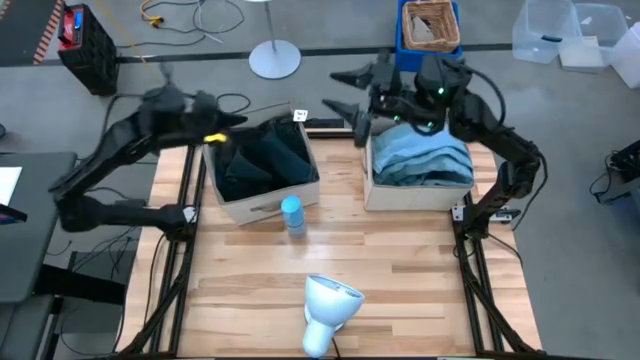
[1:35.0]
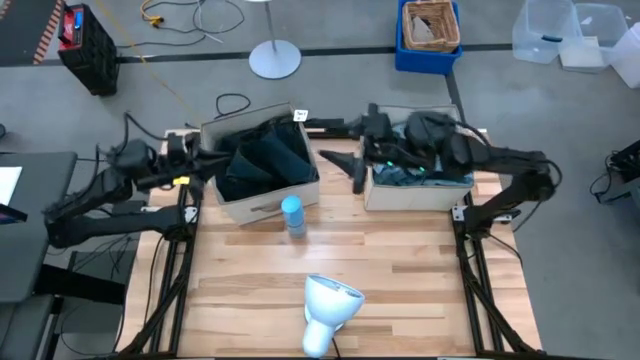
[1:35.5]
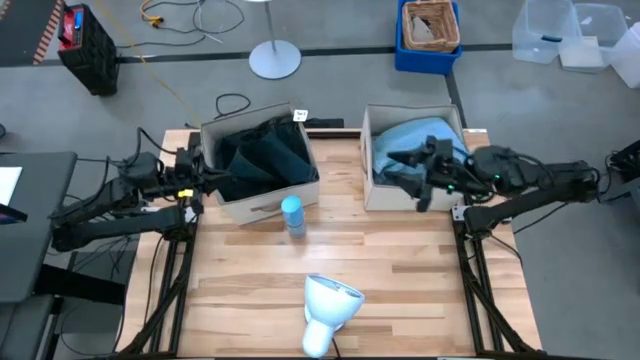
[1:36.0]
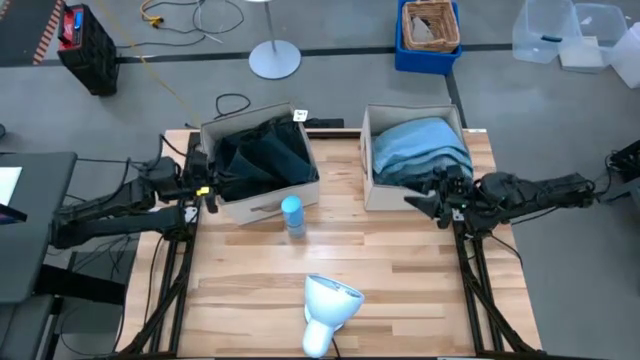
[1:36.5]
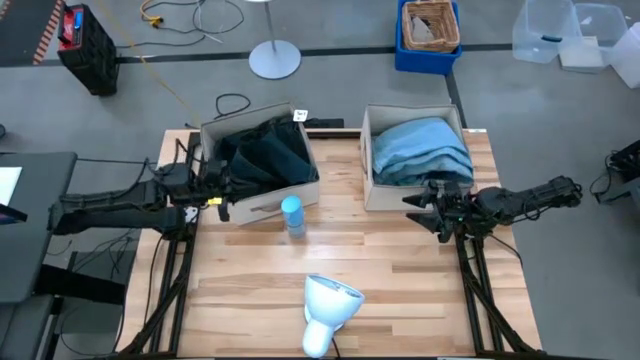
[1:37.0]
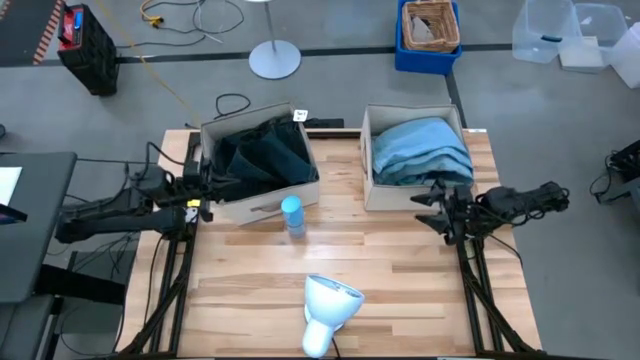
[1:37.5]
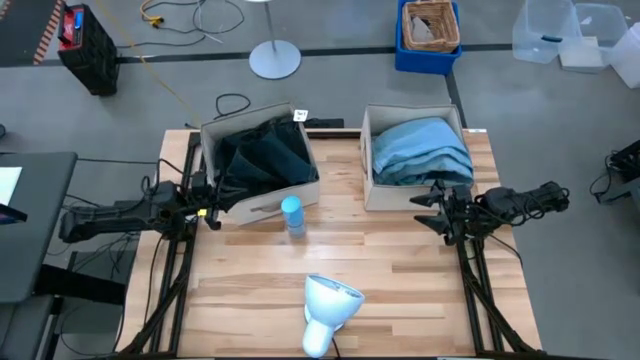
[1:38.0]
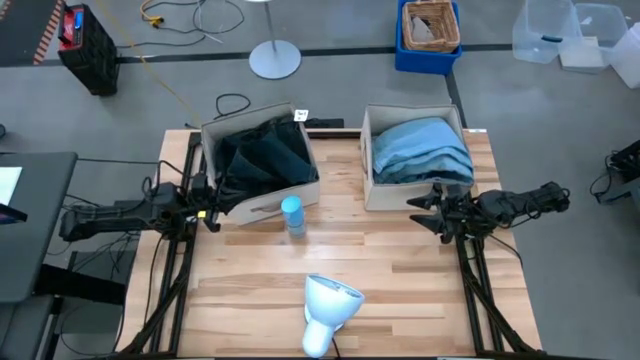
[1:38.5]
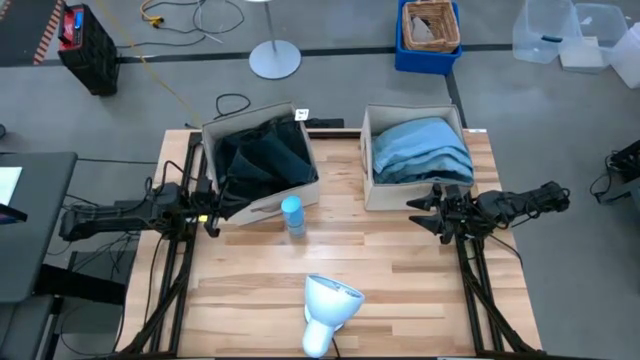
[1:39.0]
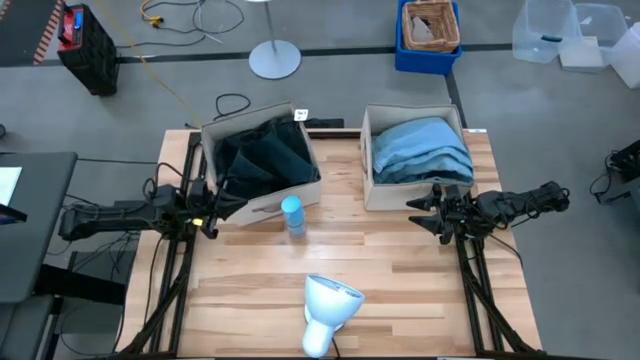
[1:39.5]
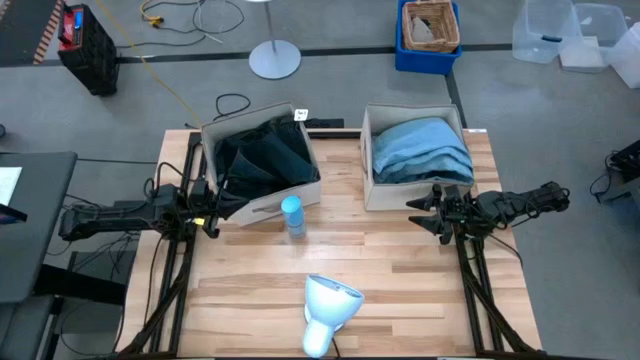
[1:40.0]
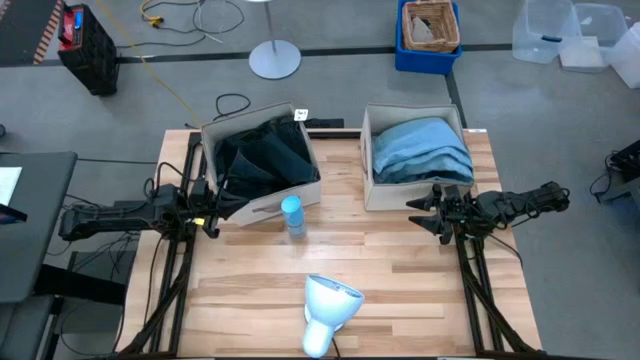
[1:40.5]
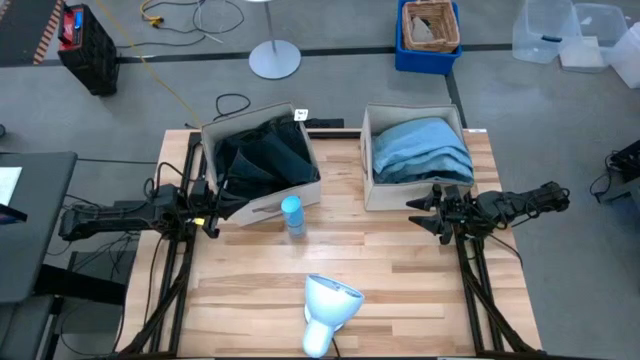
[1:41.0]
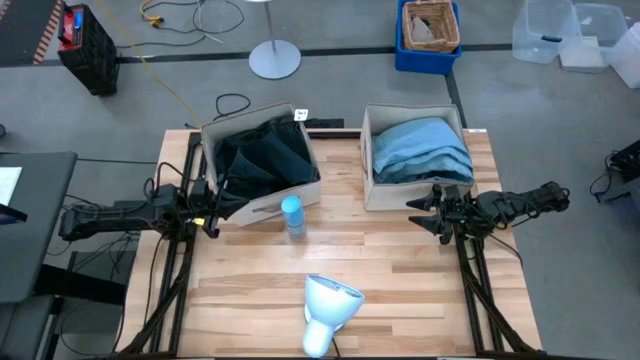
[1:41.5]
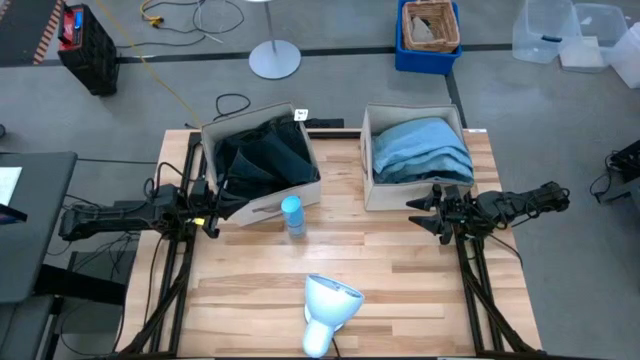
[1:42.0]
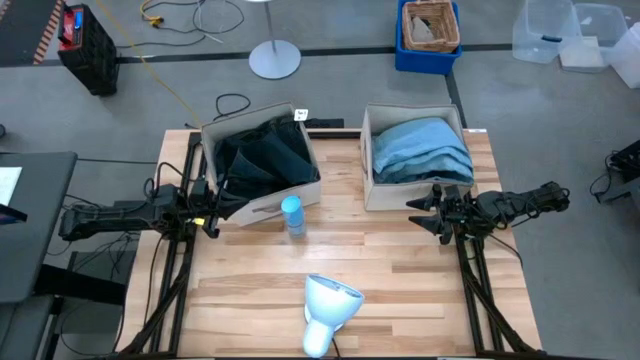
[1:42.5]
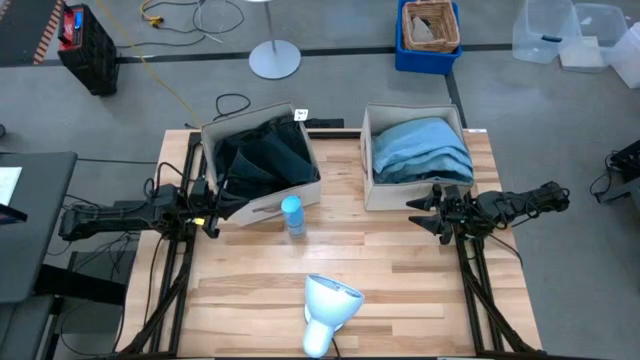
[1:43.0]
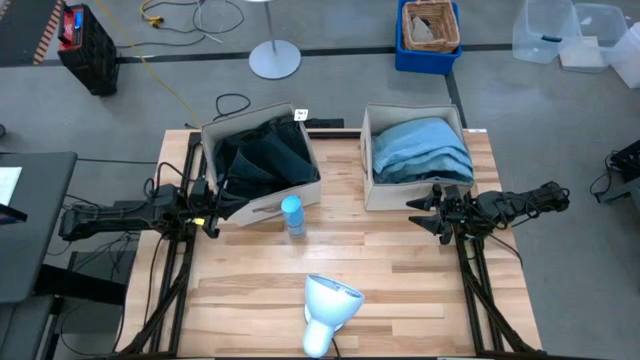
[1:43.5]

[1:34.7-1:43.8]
Task: Sort clothes
Return to Home Position

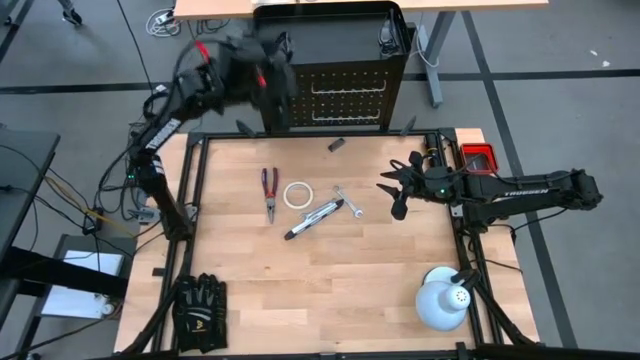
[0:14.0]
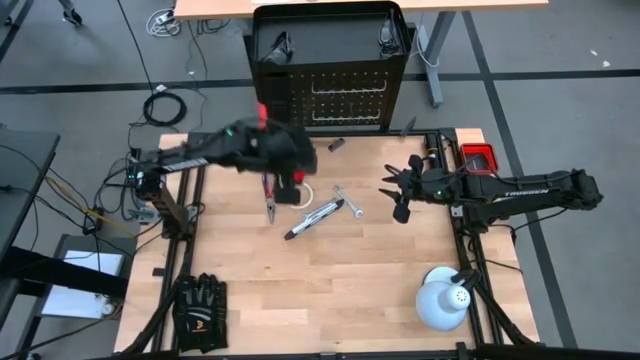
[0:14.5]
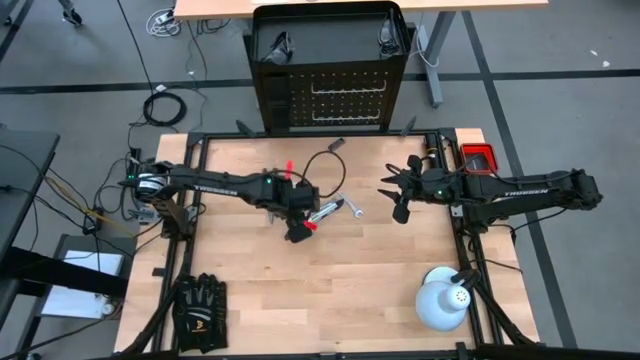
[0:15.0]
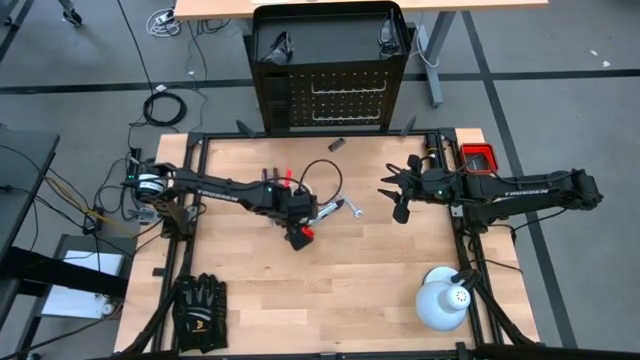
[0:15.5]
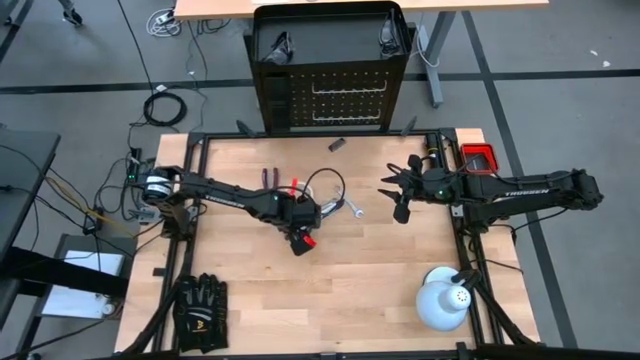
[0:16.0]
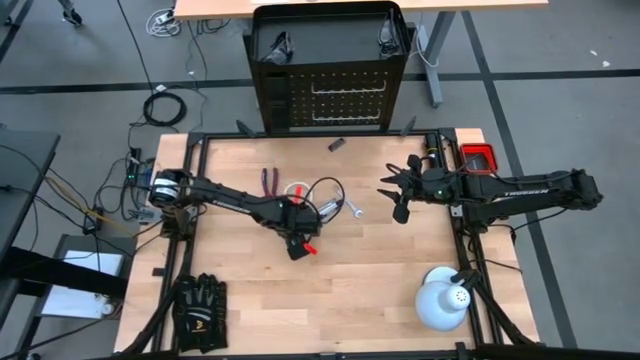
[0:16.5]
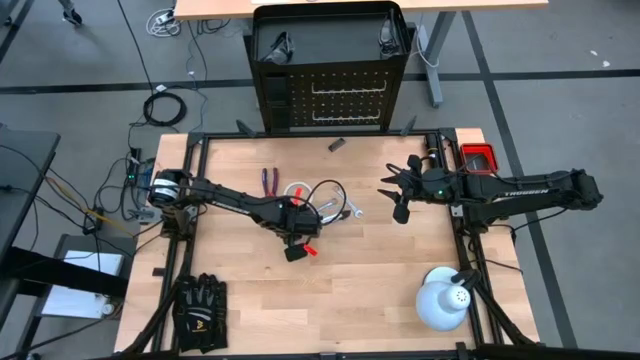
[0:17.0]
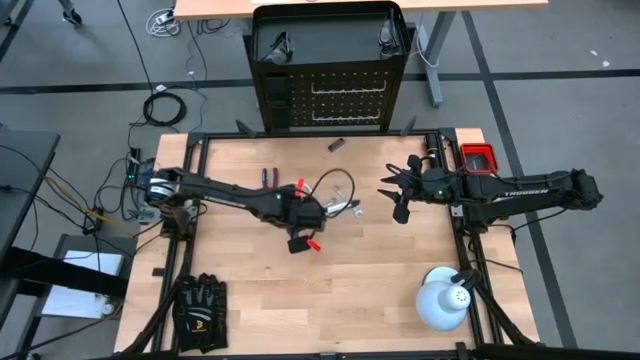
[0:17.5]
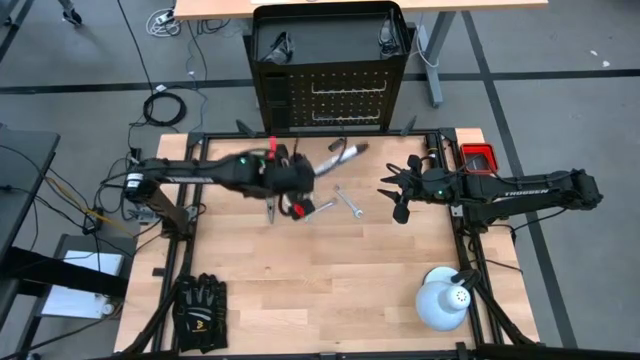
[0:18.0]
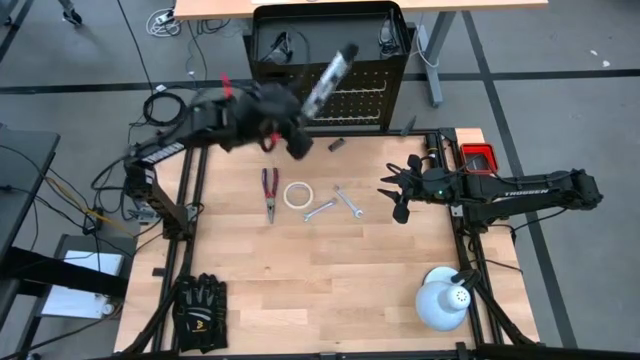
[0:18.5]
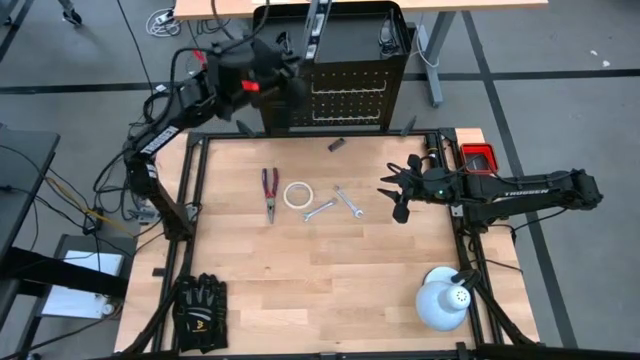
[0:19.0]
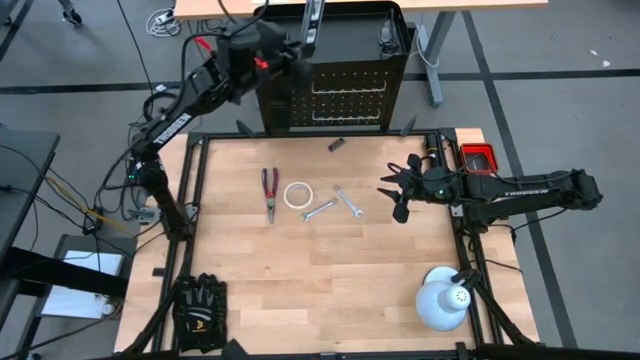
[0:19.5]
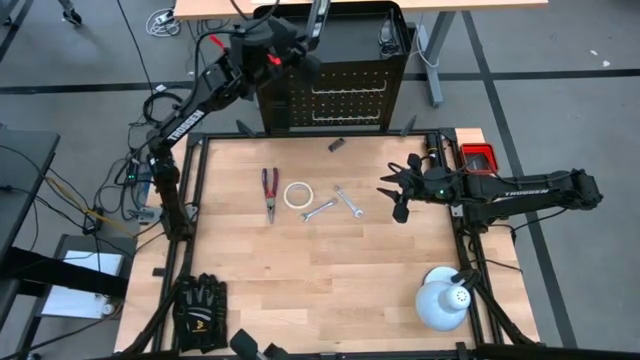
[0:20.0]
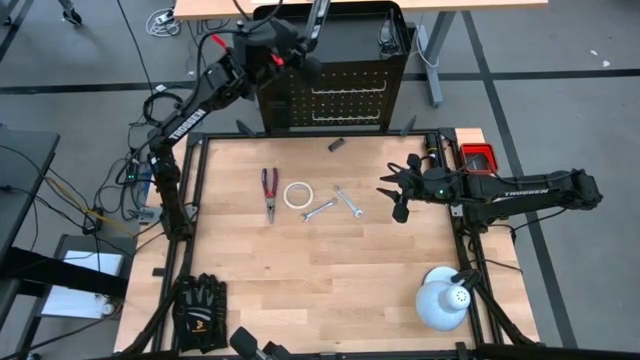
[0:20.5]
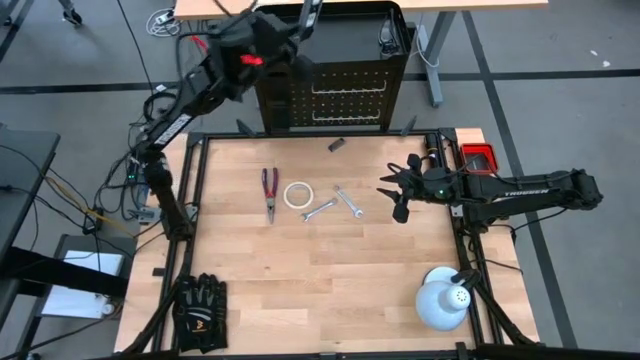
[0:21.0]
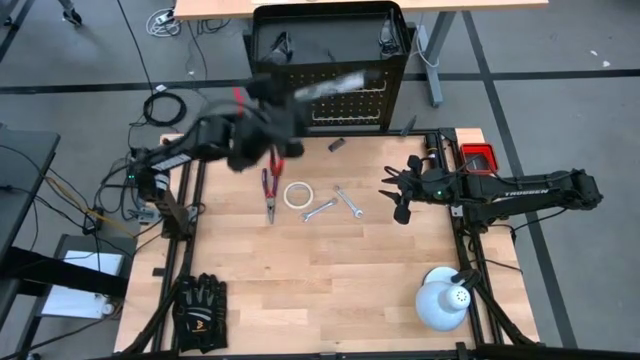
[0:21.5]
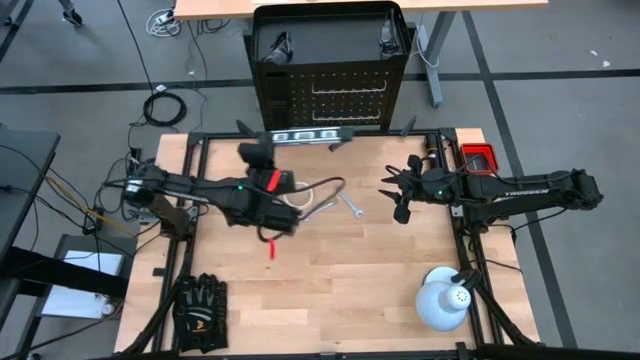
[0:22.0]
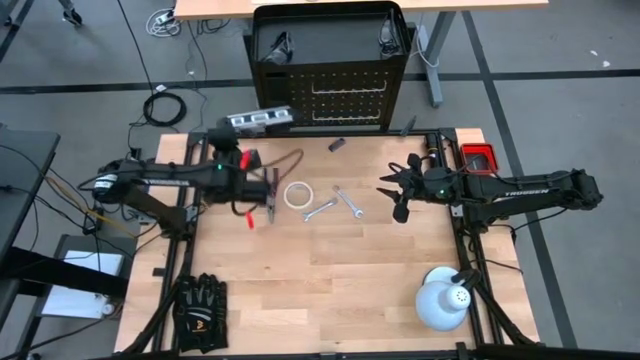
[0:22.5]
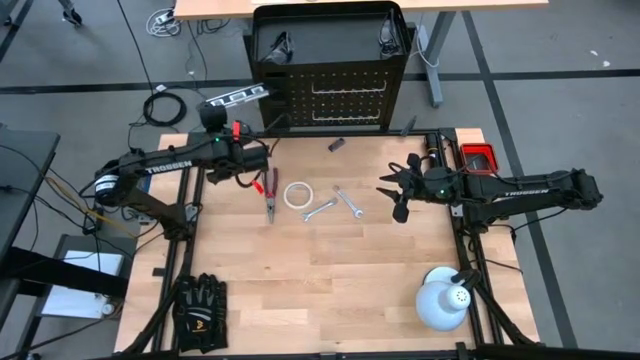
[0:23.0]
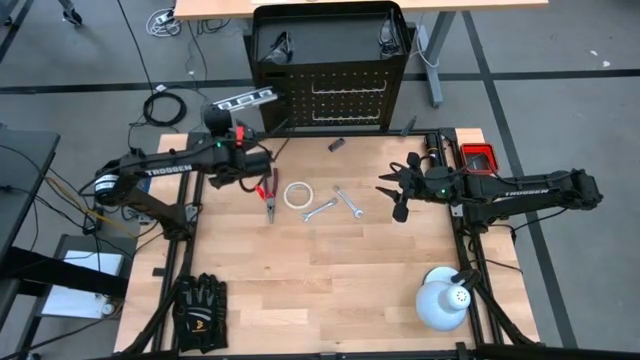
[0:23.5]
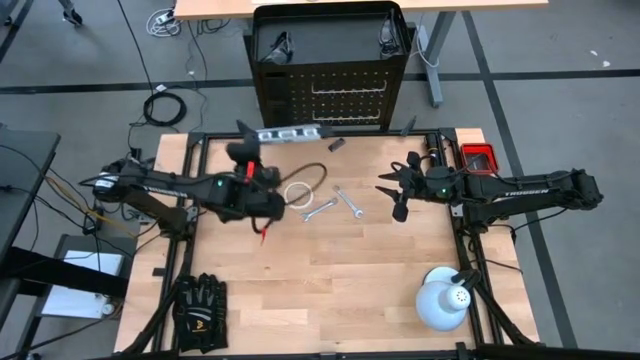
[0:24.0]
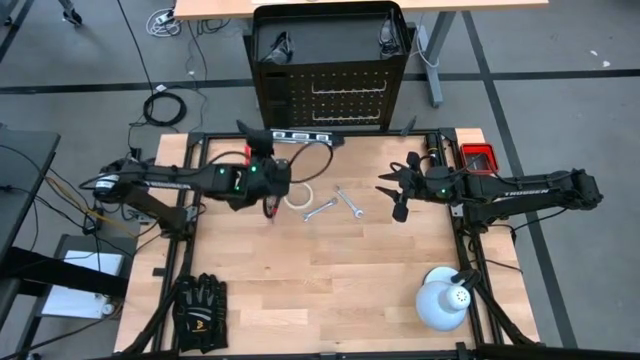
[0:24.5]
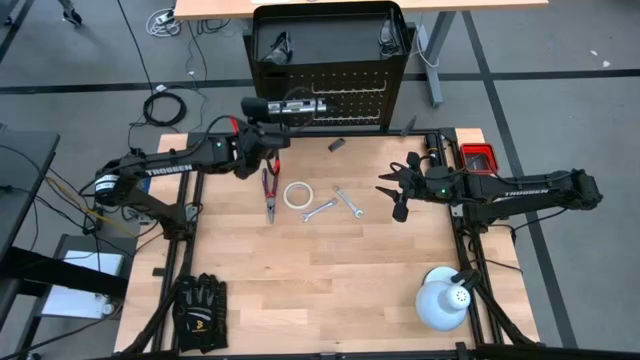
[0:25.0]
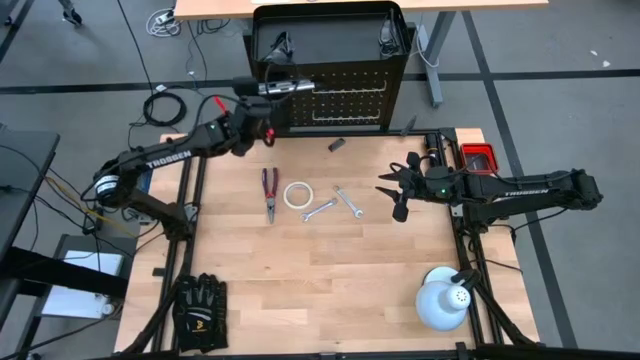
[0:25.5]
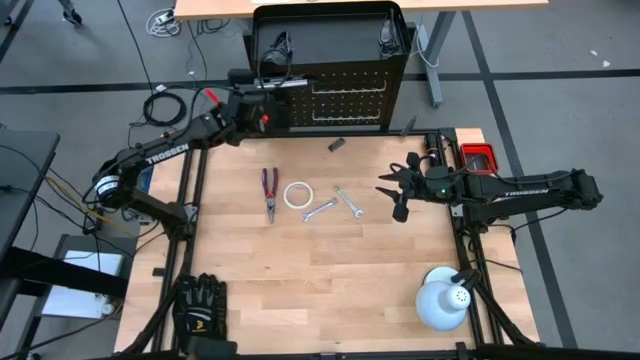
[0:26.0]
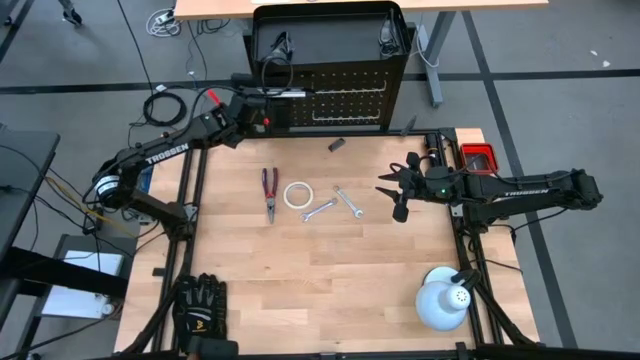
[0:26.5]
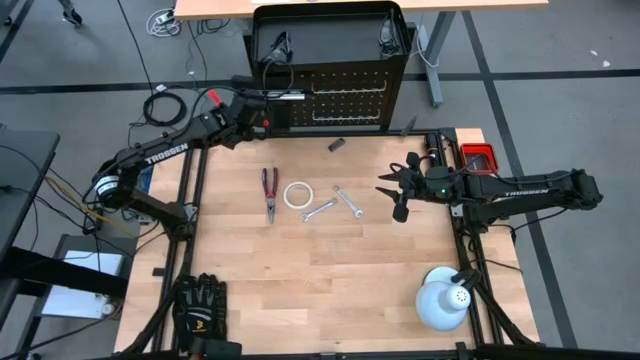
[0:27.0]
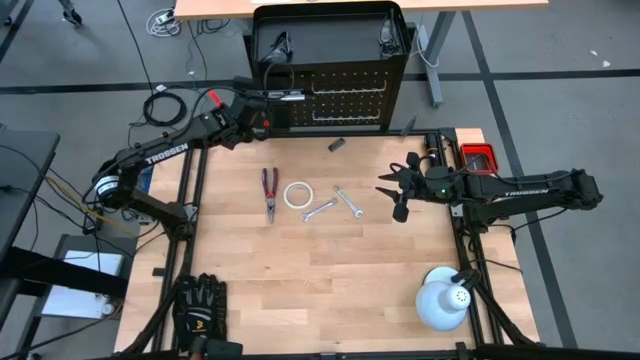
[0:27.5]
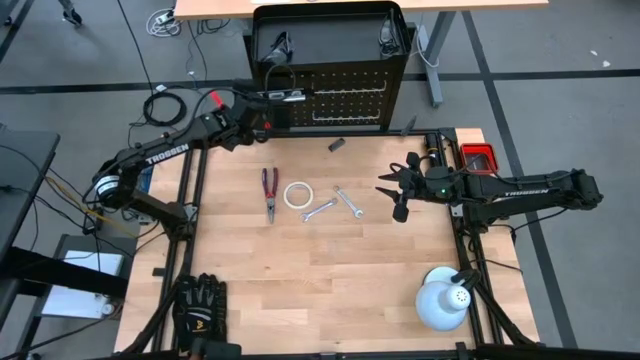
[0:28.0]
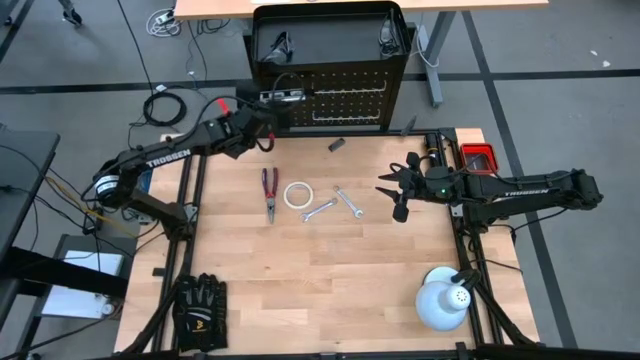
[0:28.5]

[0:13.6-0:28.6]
Task: Hang tools onto peg board
Put the spirit level on the black bin of the peg board
